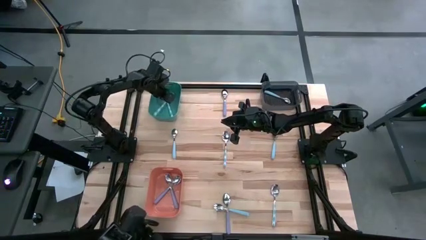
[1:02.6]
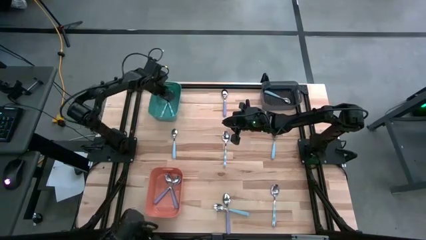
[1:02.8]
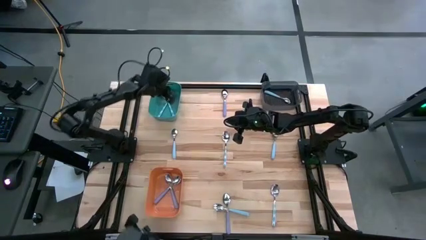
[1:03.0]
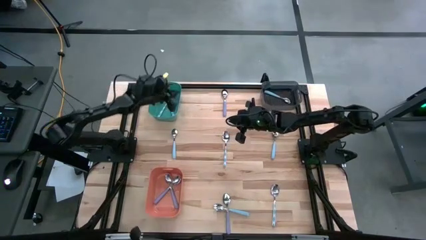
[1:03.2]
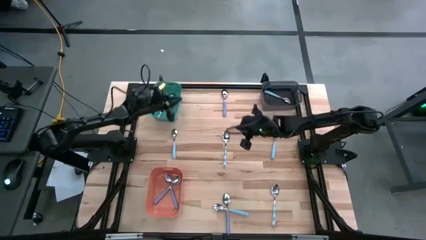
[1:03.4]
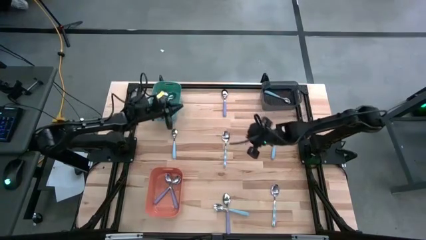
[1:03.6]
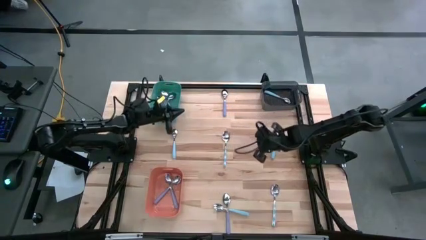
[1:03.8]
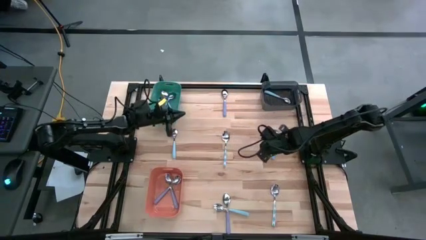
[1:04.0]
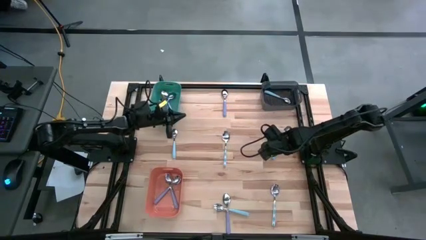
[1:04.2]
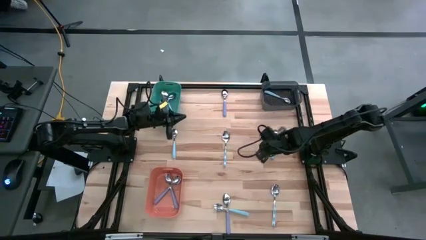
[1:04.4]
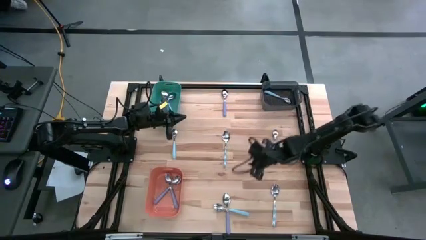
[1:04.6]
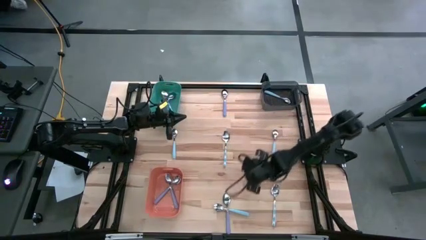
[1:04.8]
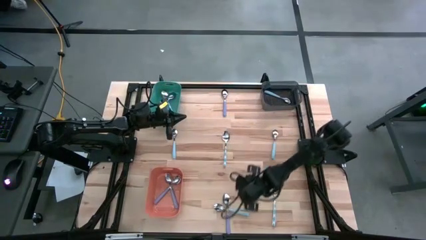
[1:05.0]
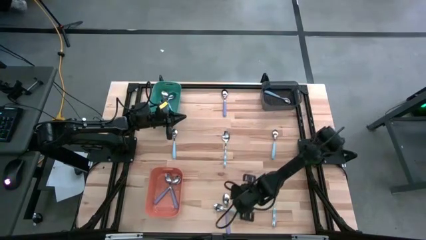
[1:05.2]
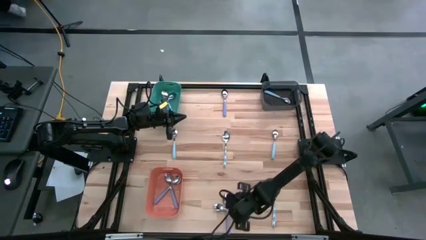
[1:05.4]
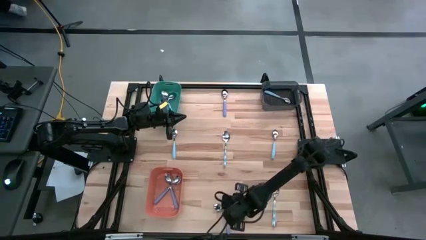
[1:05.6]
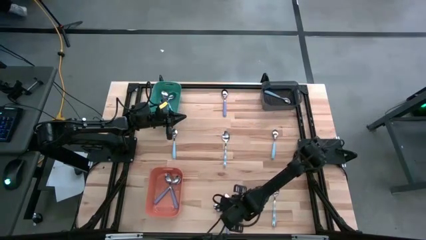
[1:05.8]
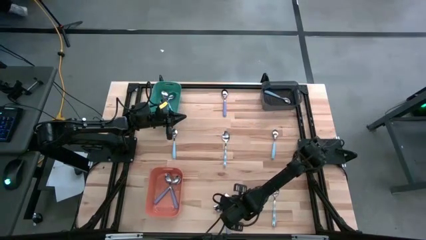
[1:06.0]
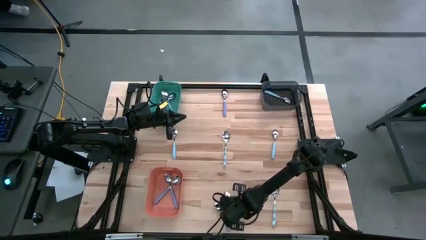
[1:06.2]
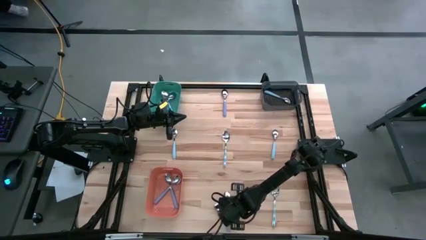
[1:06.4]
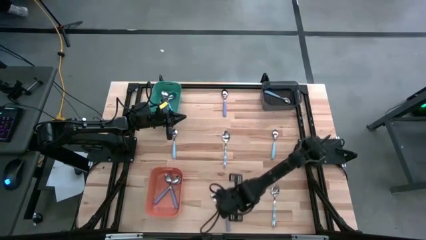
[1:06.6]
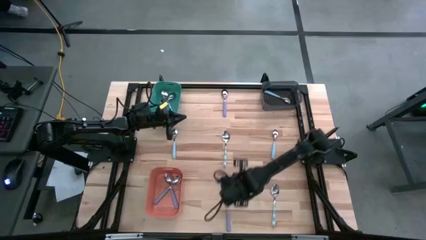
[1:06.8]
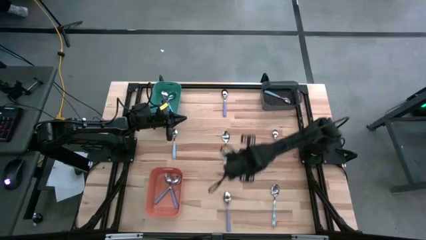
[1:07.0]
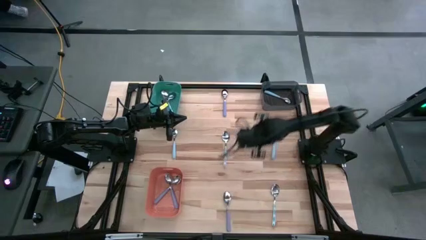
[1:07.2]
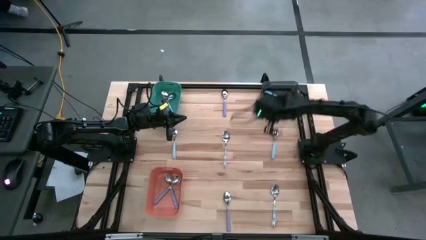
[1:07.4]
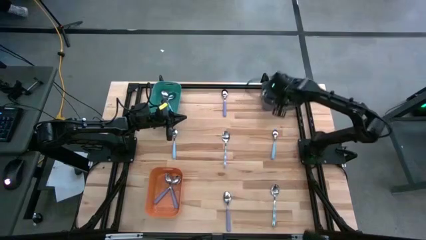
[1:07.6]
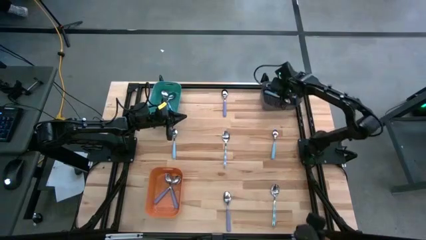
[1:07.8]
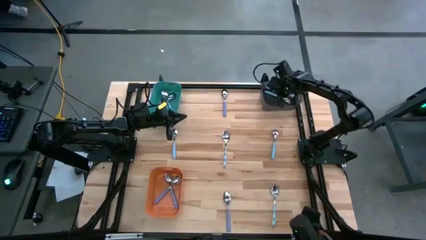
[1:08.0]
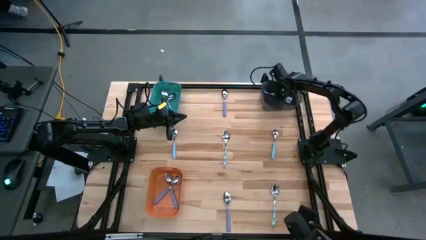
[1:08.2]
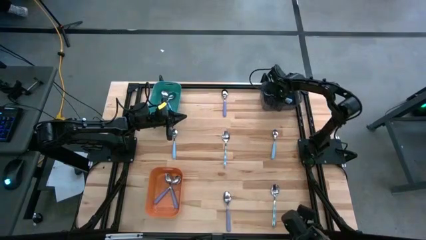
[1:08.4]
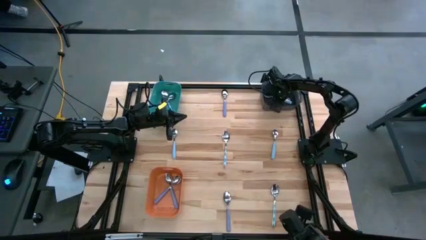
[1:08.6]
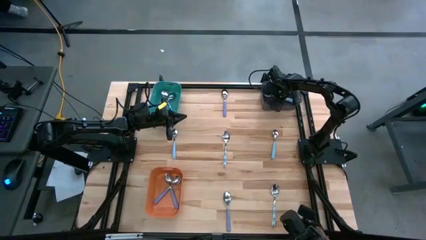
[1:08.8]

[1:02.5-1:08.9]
Task: Sort silverware by color (type)
Put the light blue spoon into the black bin

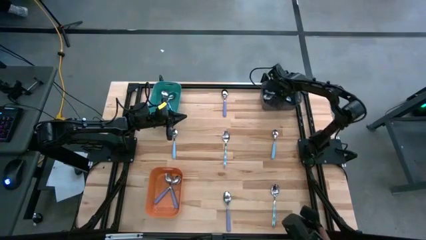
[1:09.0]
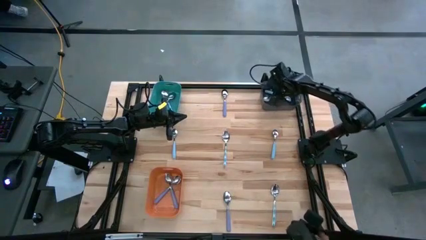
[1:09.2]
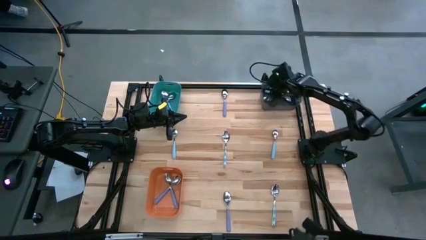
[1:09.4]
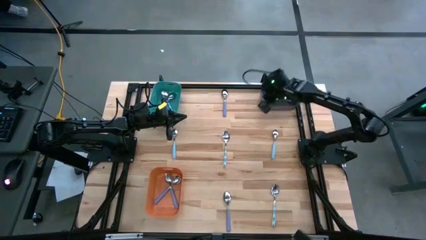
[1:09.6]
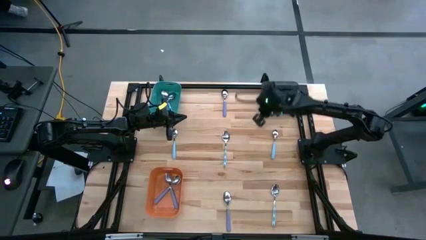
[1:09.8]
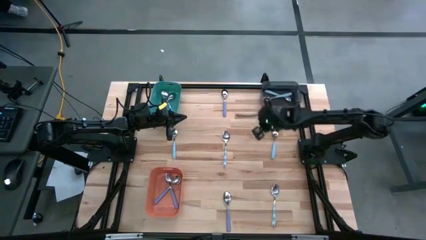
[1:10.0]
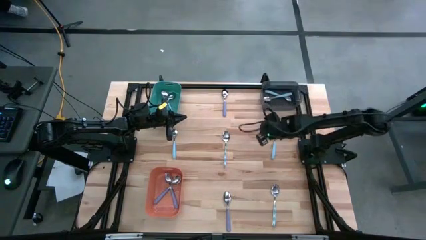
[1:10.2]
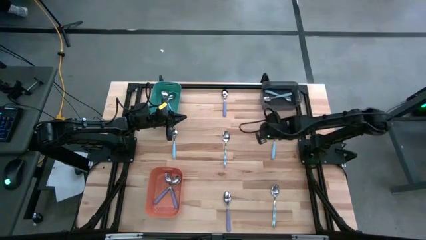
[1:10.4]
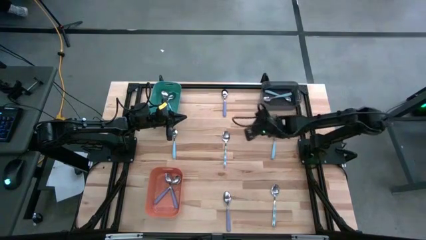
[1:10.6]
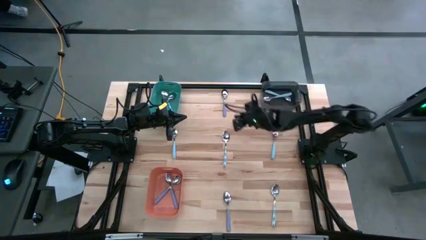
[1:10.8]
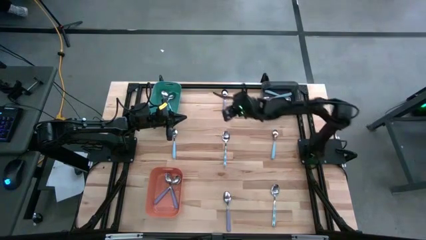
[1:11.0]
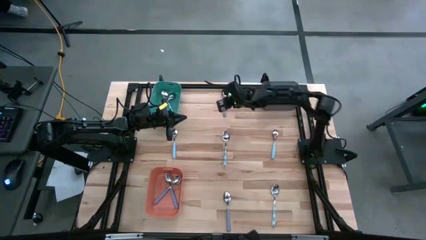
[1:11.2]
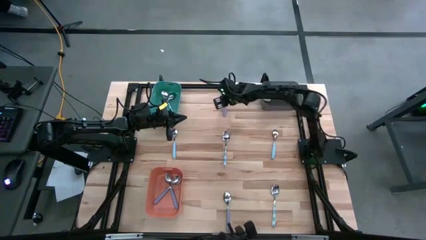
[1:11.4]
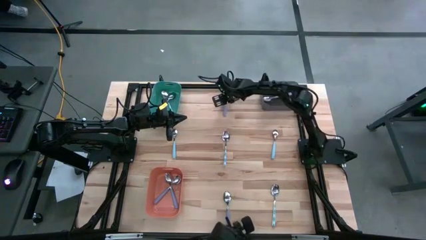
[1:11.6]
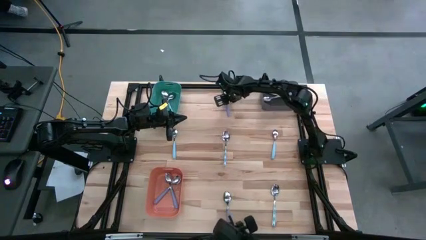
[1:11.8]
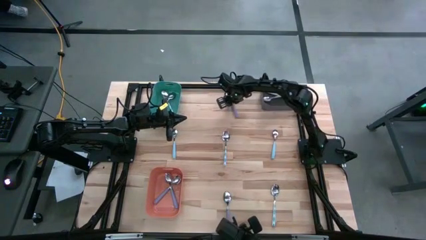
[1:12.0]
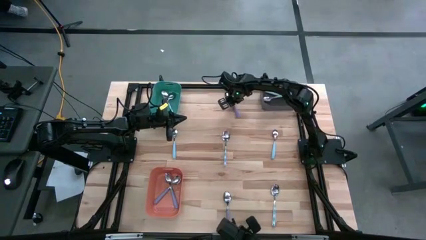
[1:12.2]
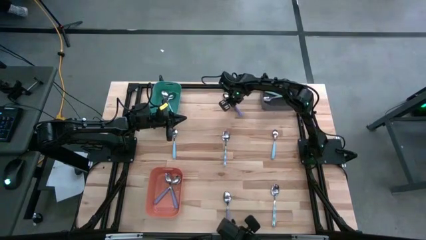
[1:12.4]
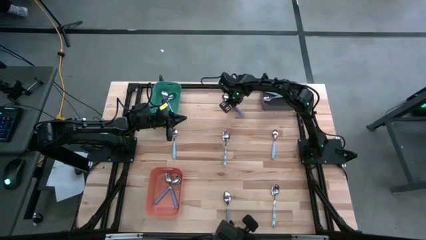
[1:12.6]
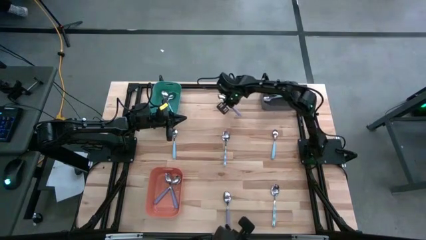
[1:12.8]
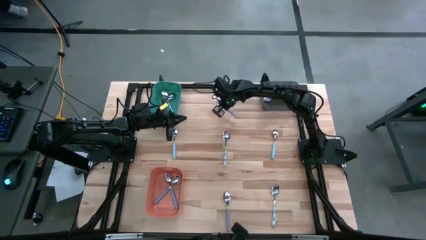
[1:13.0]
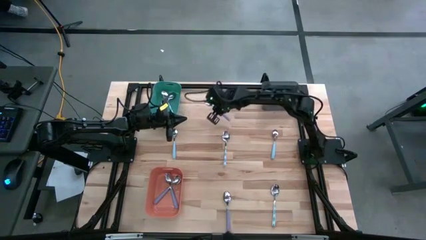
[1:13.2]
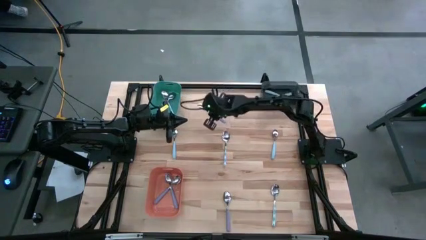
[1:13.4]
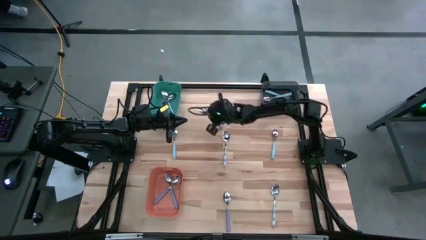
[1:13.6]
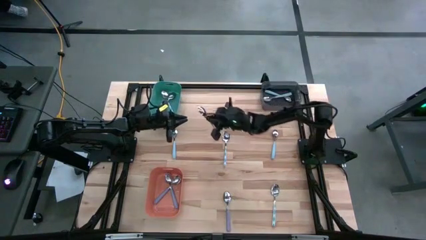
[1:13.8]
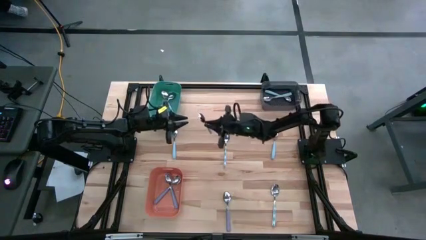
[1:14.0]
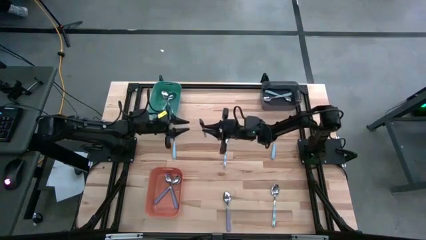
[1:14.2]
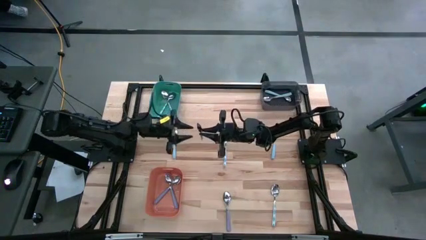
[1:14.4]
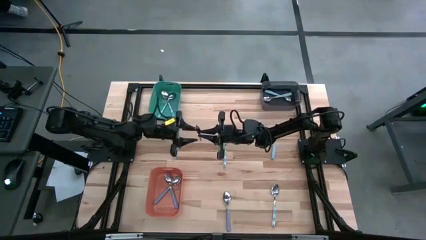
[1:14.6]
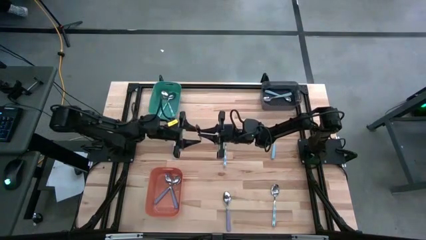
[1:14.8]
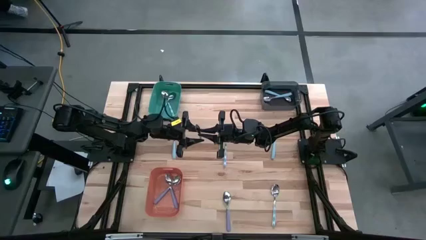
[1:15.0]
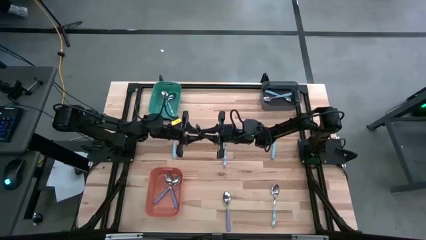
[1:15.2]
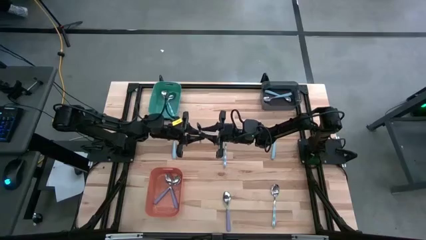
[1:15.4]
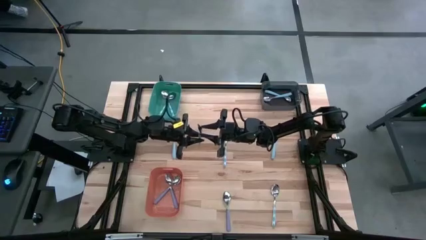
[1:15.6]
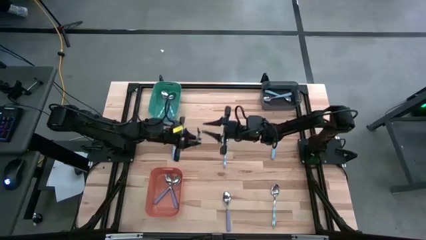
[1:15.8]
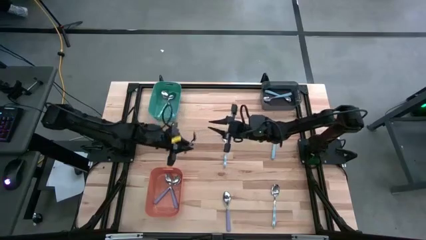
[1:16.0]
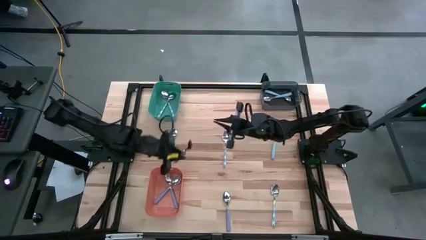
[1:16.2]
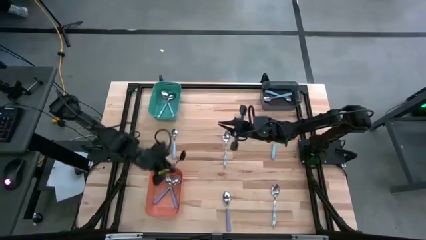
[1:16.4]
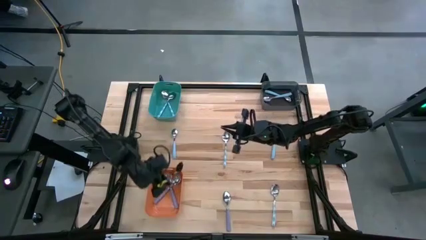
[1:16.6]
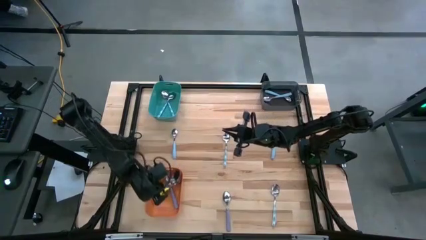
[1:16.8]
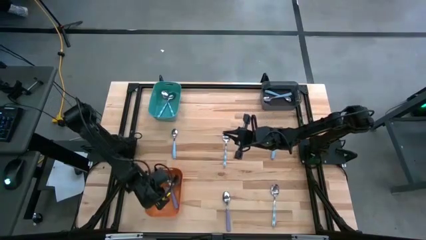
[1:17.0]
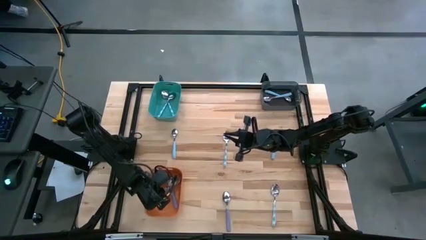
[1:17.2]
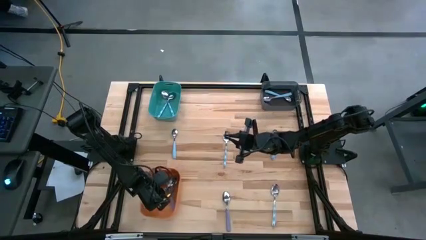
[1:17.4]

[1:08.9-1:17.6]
Put the violet spoon into the orange bin

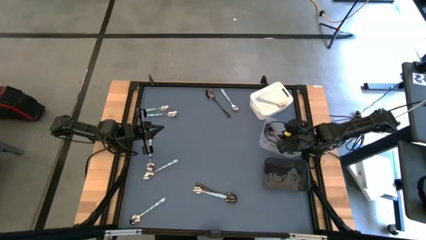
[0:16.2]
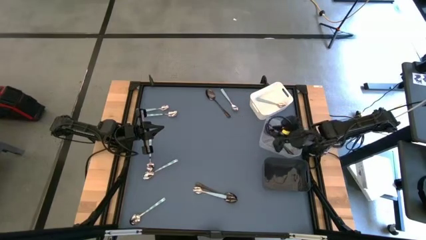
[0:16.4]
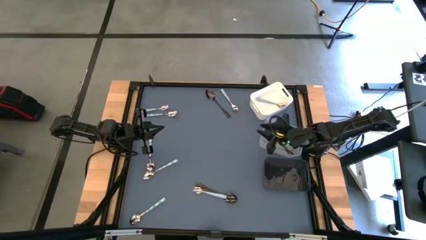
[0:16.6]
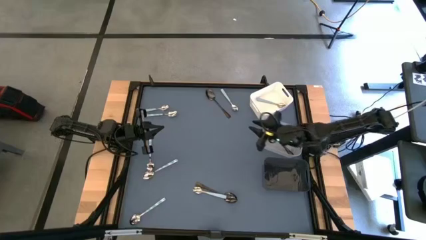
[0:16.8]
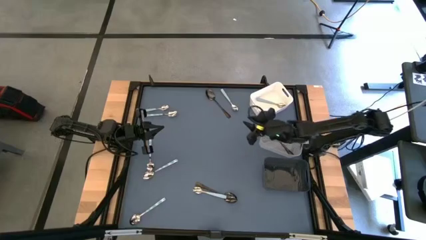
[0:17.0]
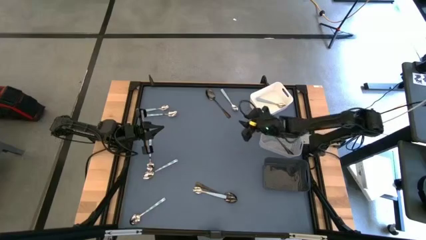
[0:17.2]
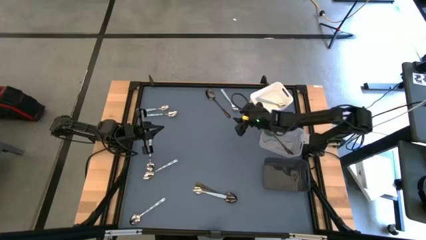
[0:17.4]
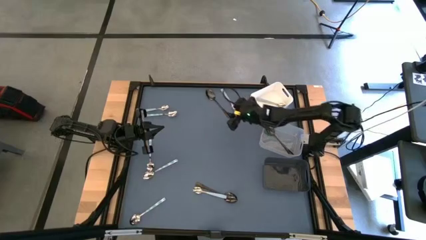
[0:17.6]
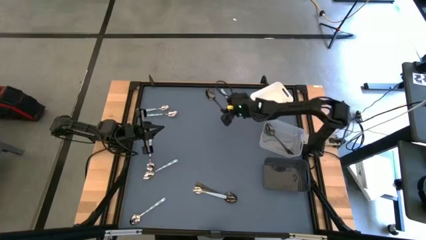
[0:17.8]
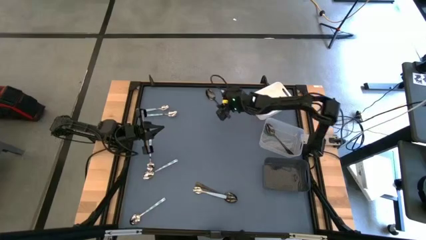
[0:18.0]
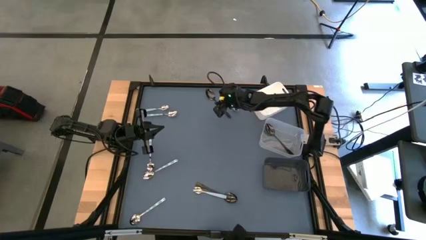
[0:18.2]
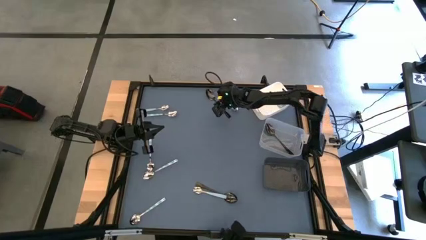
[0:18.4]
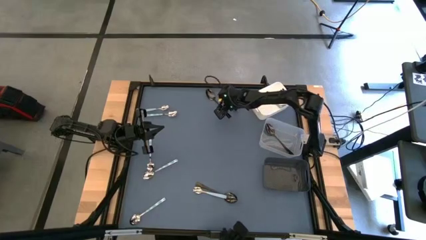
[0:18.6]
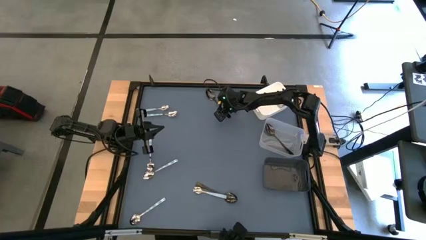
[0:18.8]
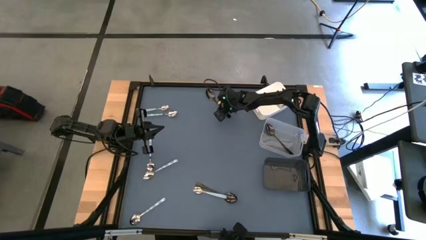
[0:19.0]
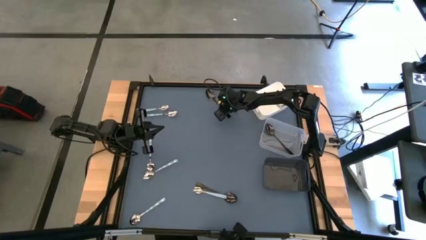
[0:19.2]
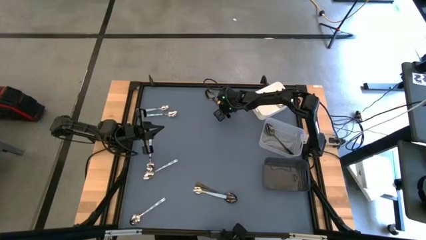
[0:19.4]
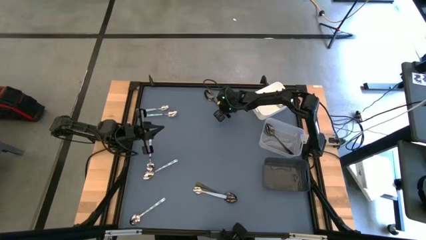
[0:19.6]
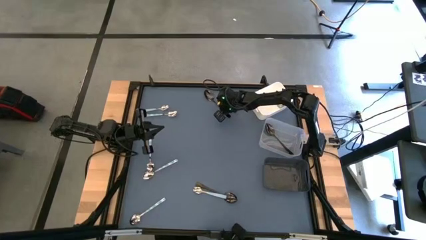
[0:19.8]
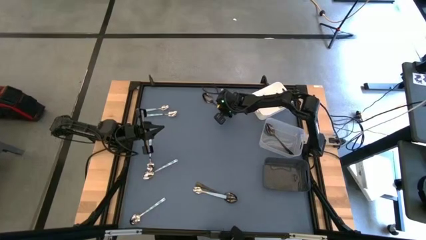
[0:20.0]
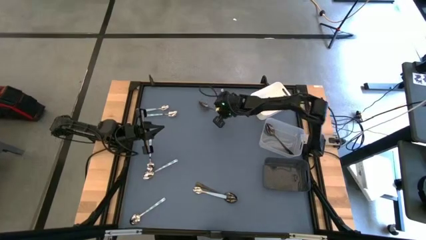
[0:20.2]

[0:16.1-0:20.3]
Task: Sort silverware by color (type)
Put the top black spoon into the transparent bin
